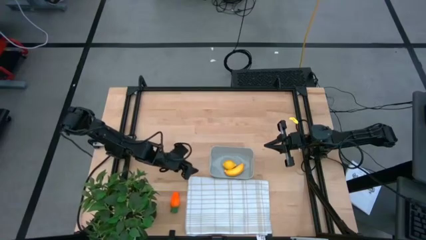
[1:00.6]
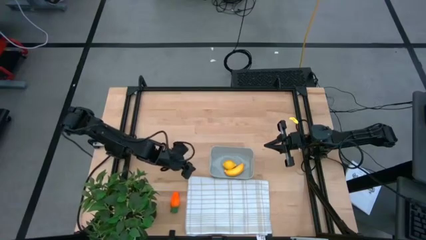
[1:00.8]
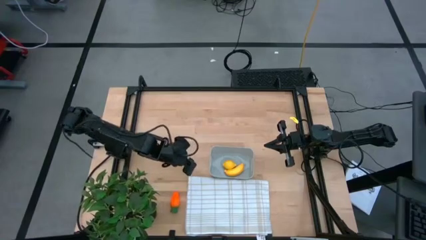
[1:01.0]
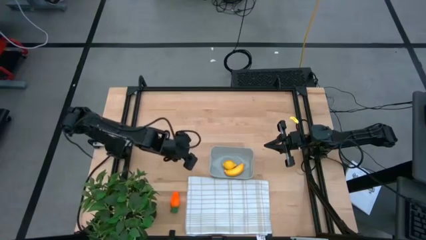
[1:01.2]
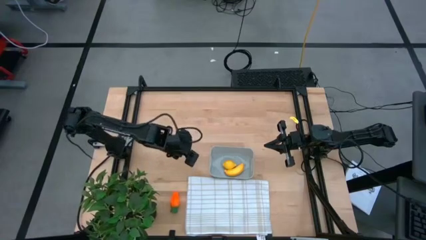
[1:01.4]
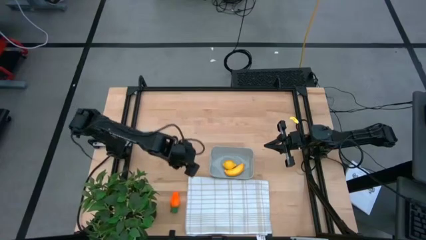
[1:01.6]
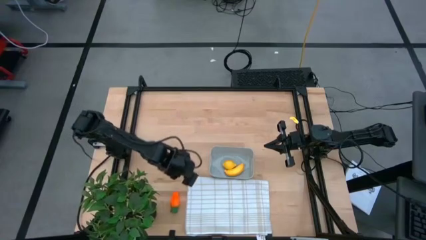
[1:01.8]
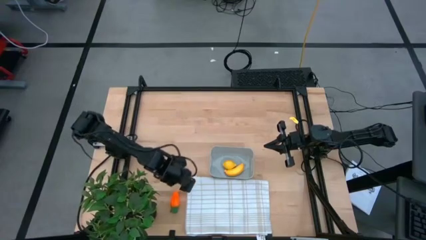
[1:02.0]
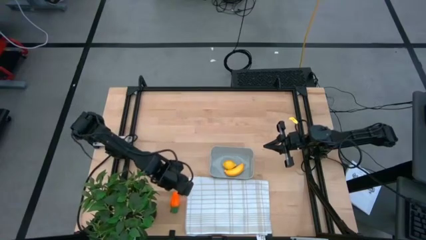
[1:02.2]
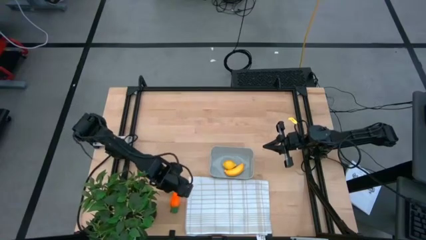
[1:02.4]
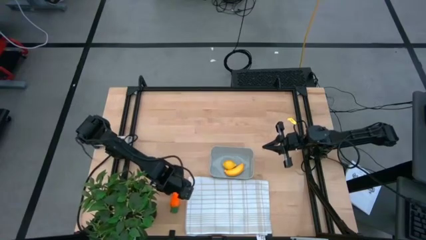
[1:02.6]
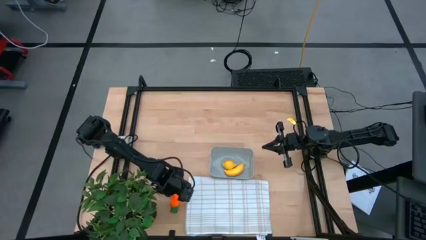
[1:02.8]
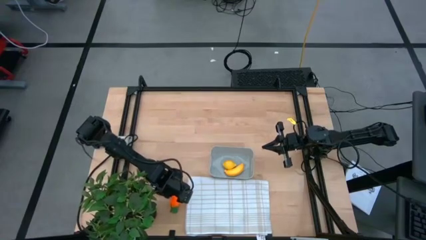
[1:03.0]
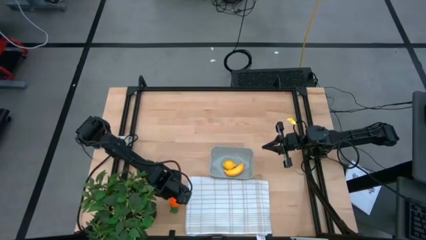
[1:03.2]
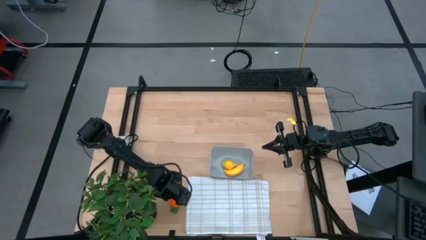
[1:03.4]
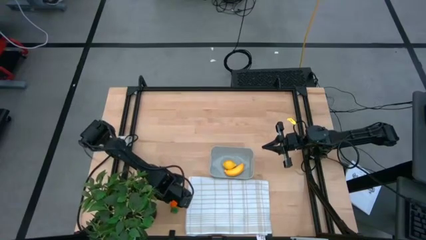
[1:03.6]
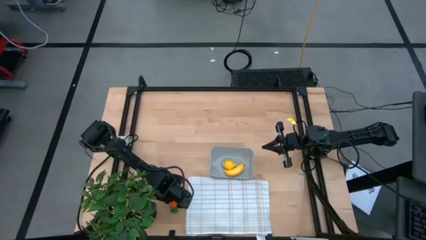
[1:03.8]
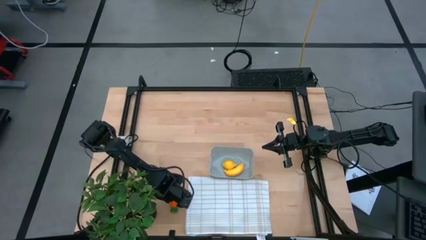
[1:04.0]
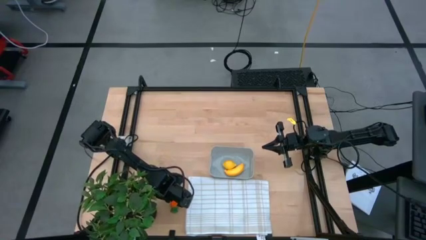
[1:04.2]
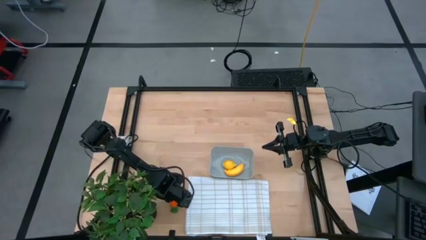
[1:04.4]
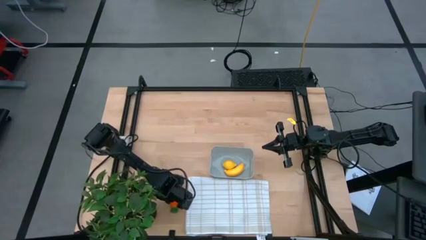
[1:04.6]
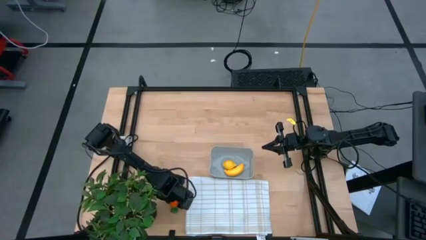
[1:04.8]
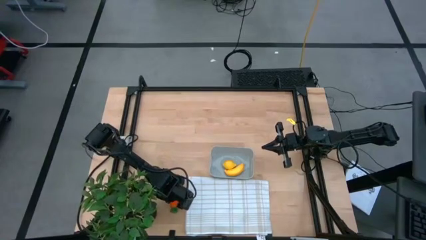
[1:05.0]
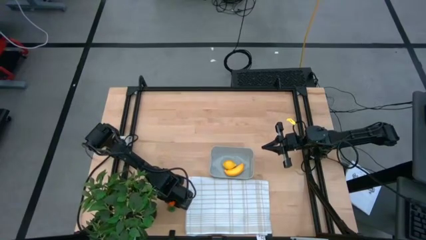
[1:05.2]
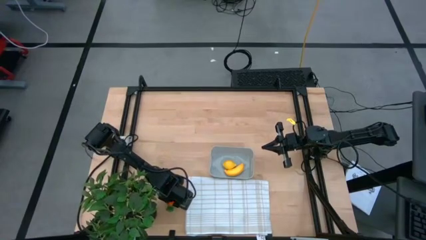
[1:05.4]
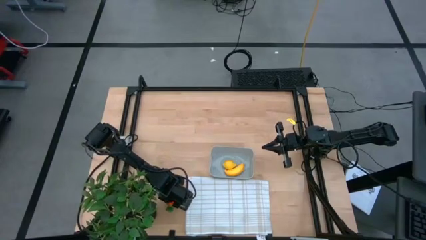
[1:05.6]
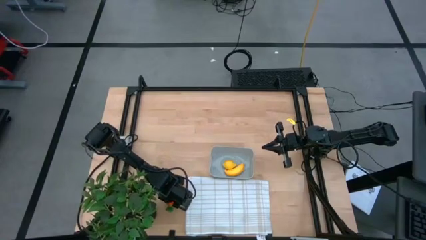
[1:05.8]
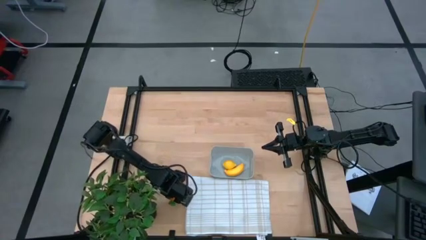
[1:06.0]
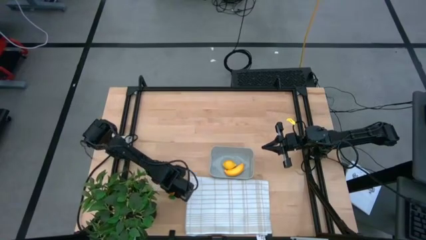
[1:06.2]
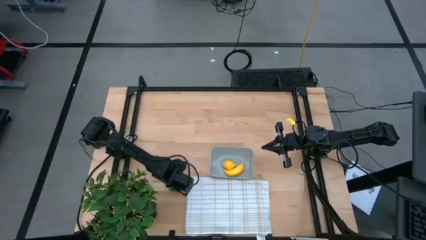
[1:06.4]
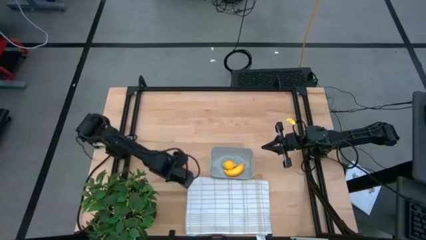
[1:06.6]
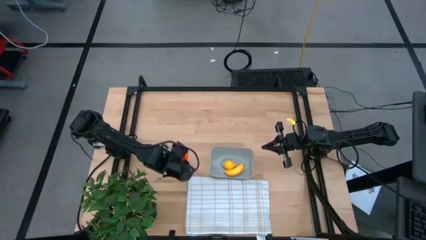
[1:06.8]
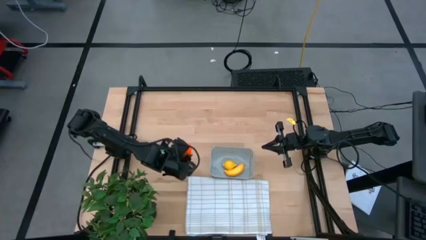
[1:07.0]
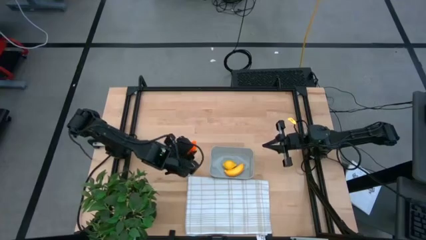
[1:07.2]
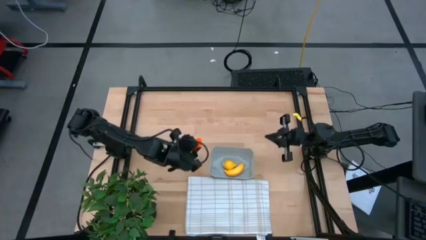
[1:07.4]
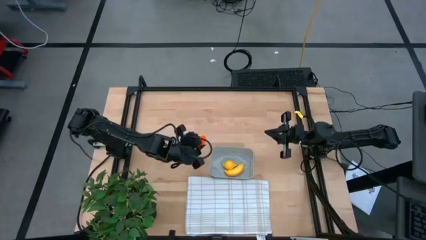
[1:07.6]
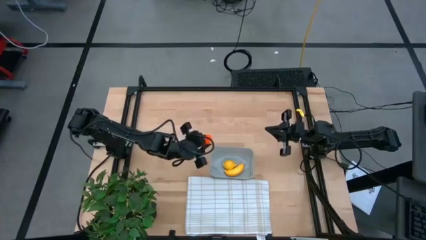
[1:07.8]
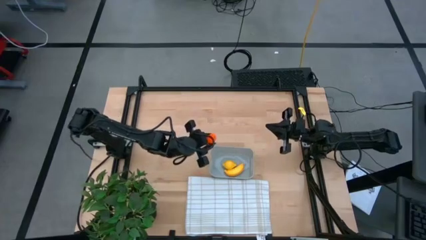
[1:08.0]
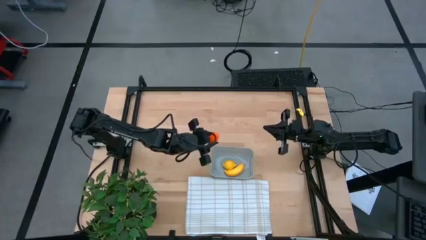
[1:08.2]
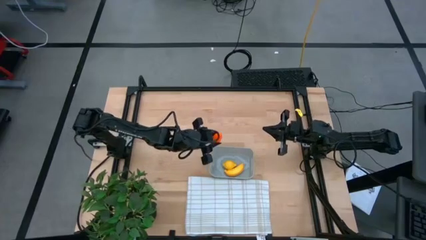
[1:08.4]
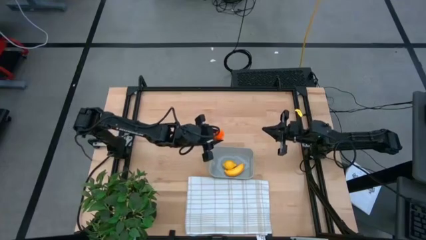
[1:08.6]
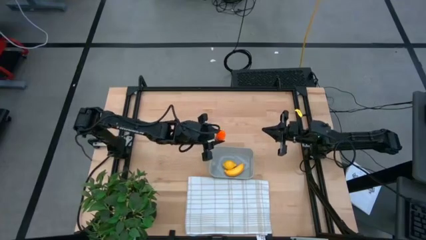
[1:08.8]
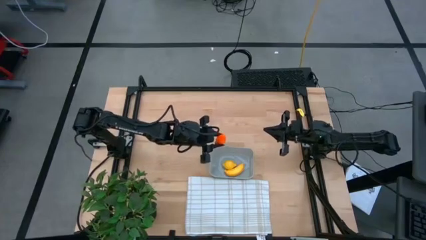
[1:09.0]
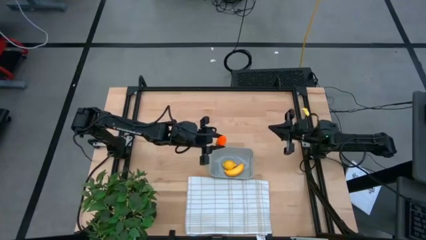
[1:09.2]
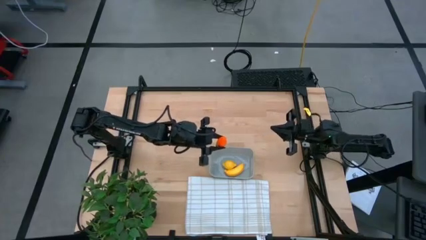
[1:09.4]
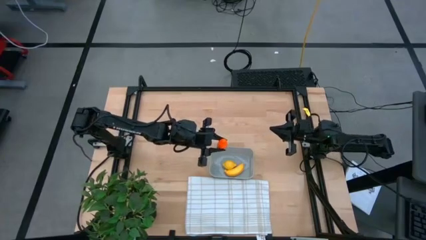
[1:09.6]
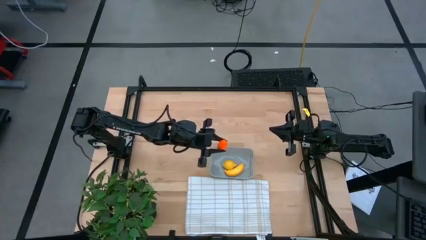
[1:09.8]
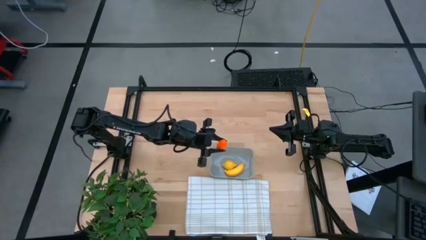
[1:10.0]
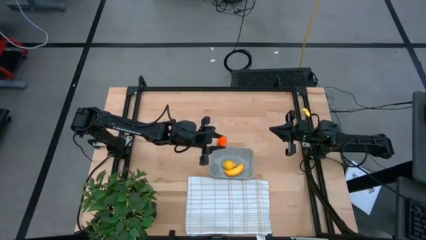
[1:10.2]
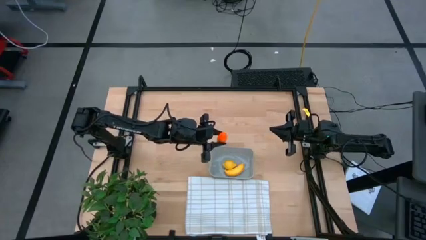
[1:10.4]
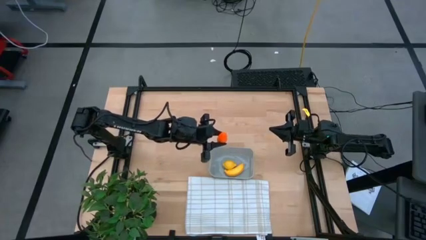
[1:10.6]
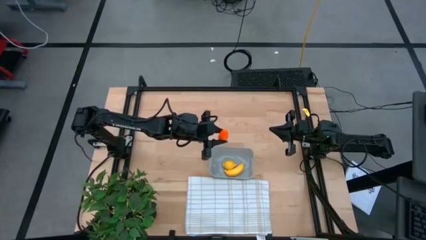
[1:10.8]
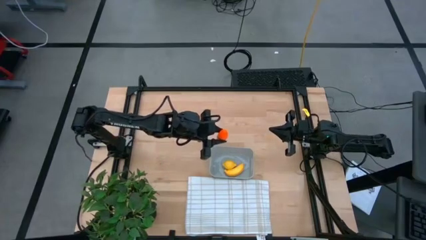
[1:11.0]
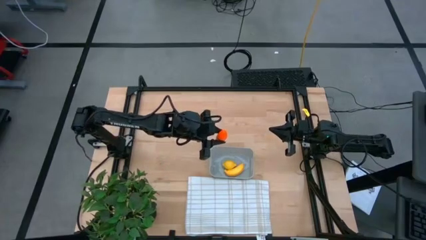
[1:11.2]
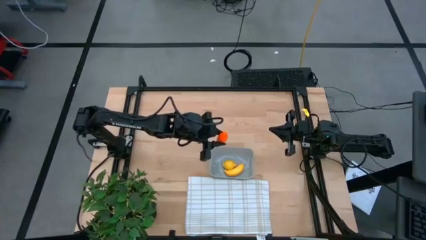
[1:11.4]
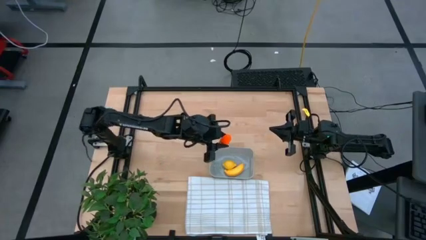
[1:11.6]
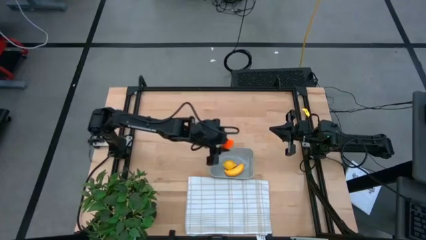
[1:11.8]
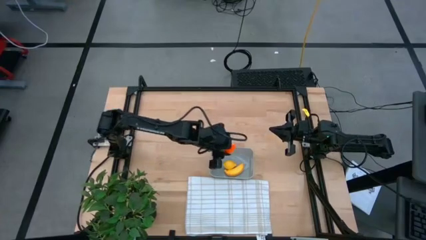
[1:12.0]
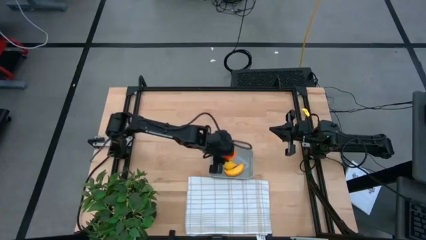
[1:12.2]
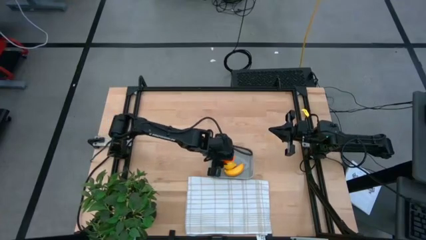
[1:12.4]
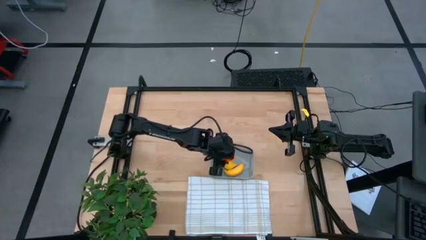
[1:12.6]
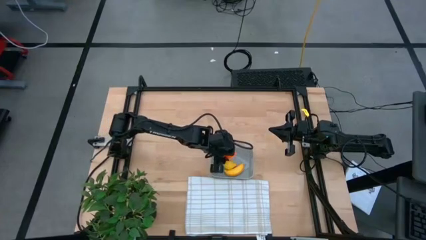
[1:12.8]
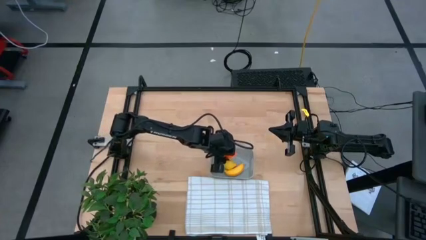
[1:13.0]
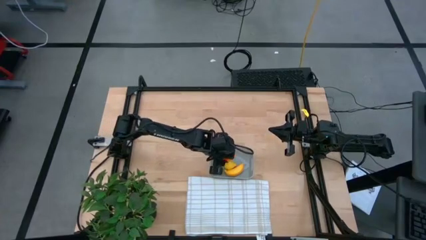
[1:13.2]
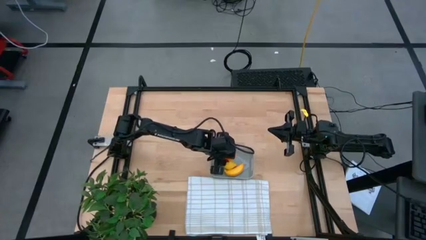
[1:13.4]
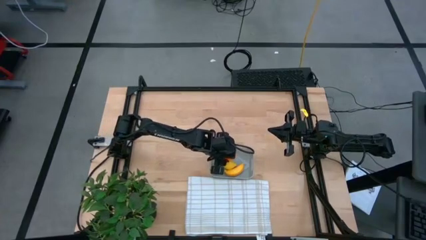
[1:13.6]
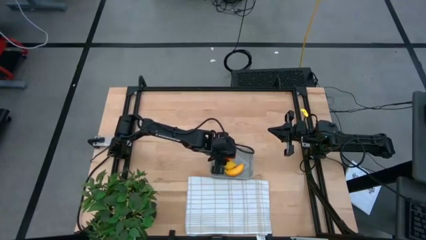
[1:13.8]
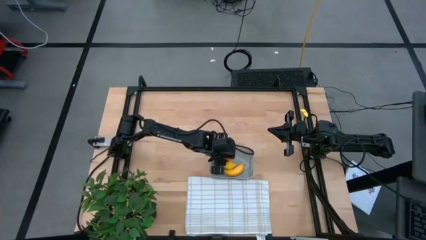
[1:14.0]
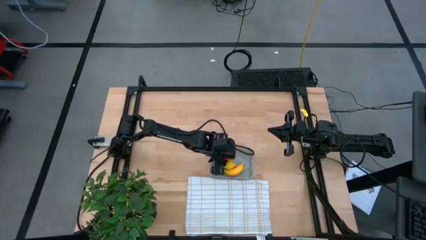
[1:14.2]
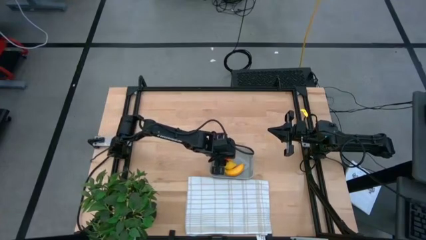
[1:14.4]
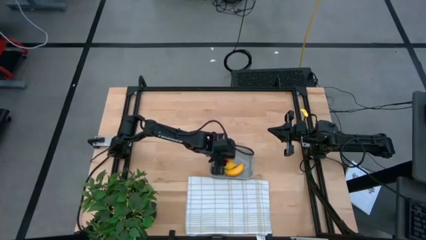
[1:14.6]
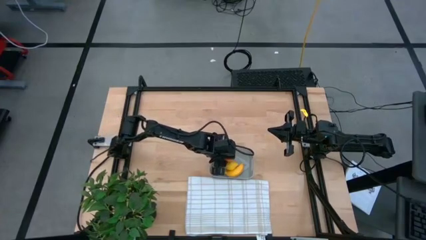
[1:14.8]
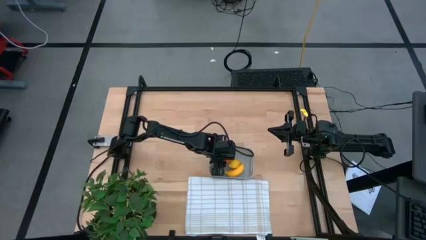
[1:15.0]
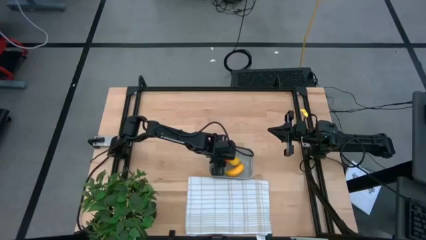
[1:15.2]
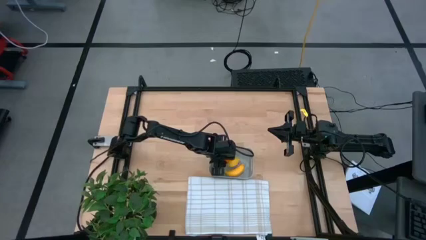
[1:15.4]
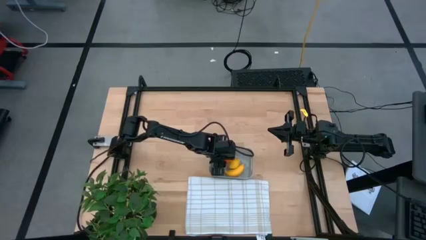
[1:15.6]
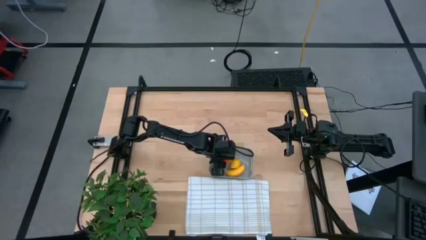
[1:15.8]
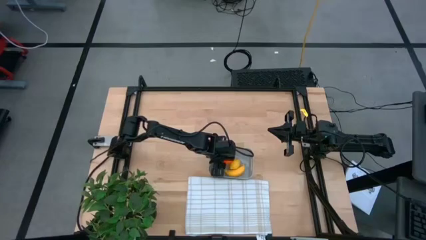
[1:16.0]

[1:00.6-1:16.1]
Task: Pick and placing Produce into tupperware
Put the orange carrot into the bin
